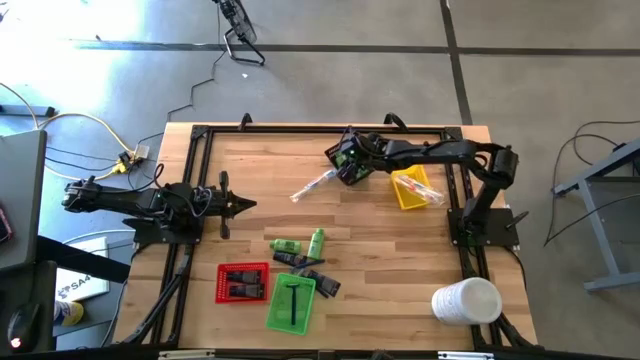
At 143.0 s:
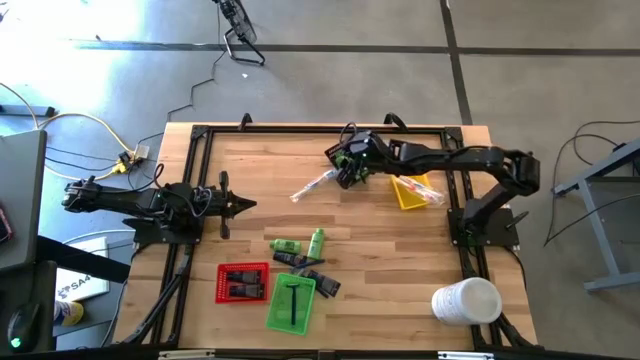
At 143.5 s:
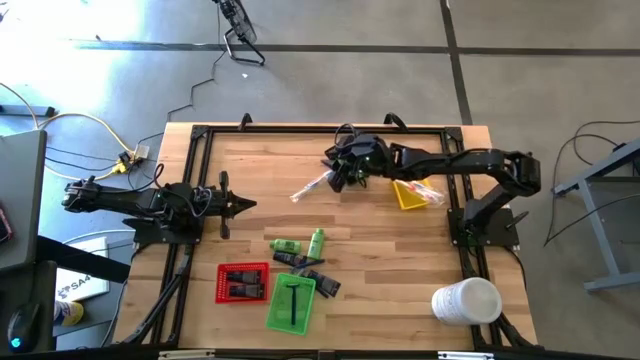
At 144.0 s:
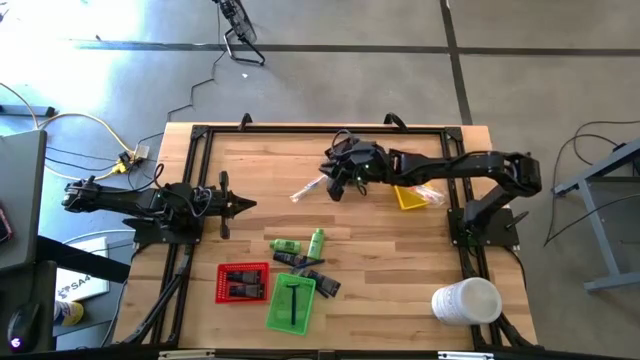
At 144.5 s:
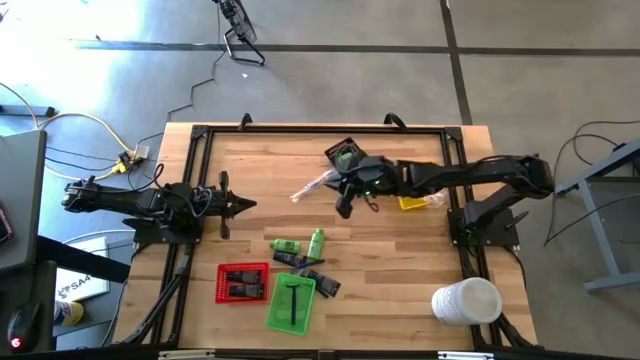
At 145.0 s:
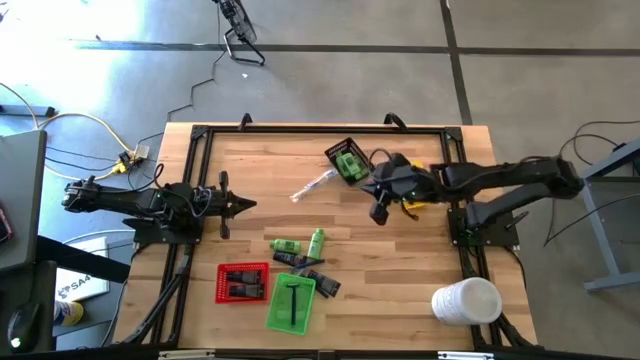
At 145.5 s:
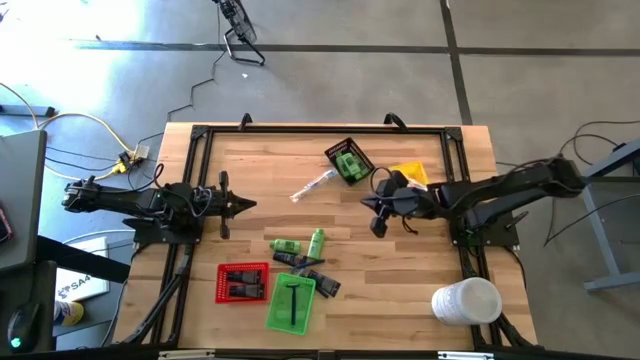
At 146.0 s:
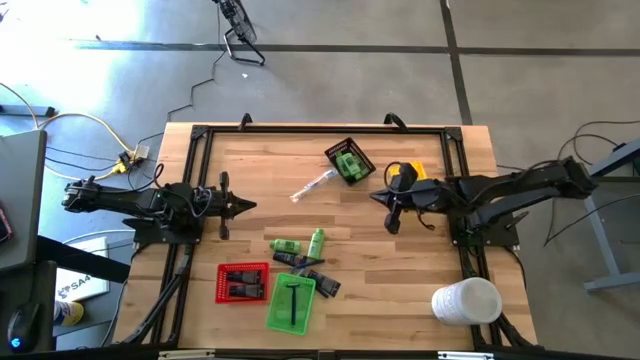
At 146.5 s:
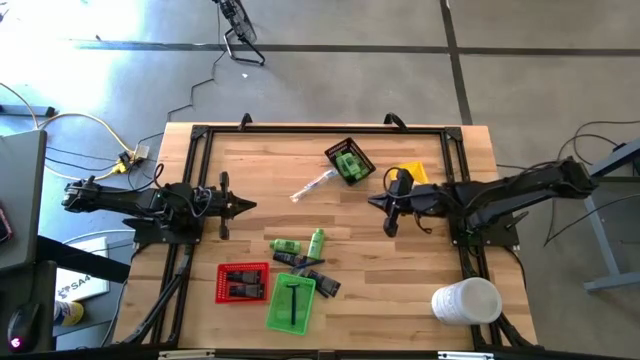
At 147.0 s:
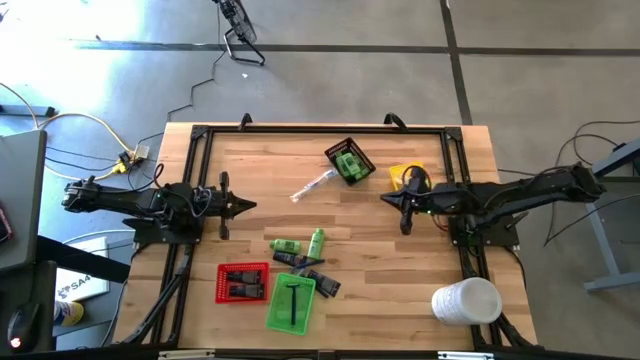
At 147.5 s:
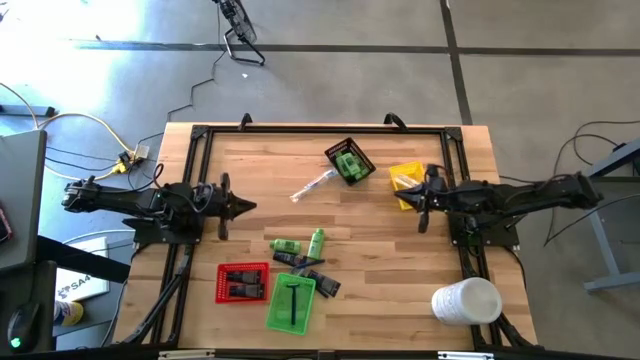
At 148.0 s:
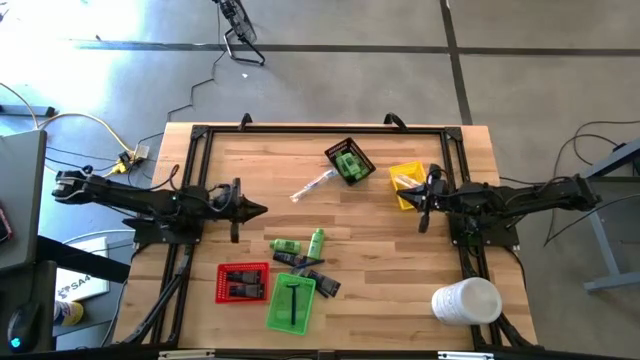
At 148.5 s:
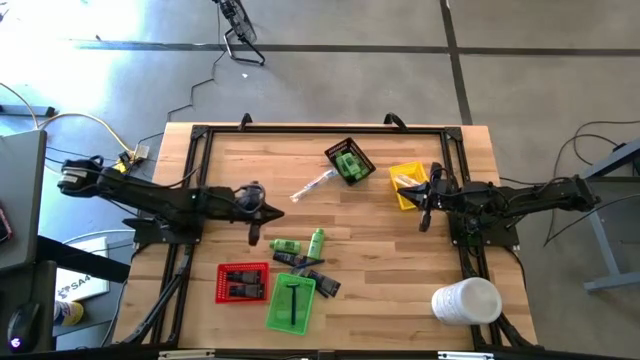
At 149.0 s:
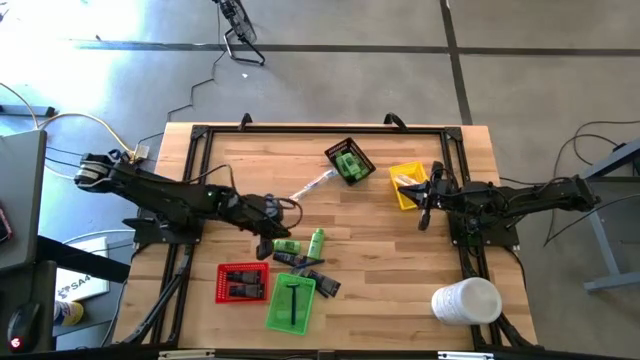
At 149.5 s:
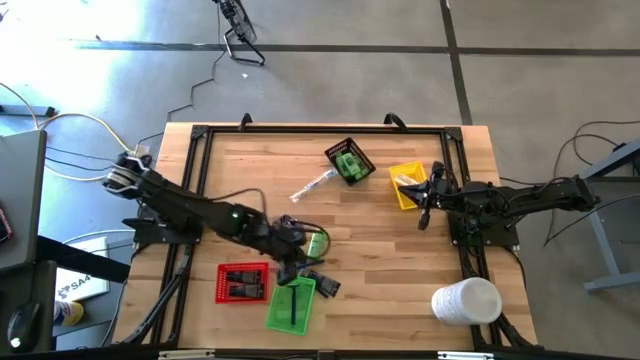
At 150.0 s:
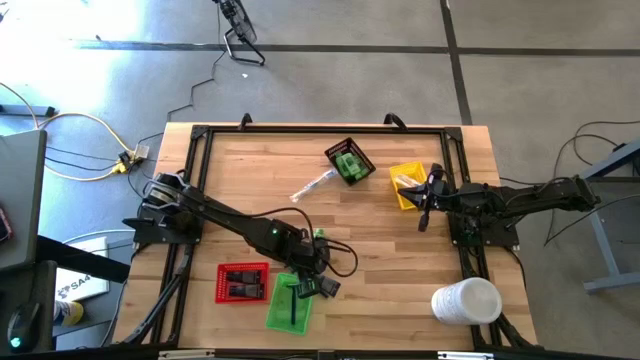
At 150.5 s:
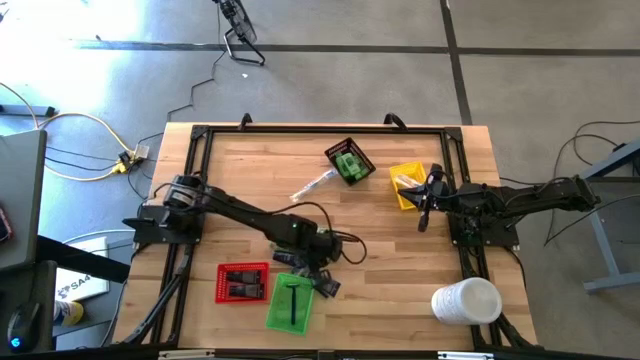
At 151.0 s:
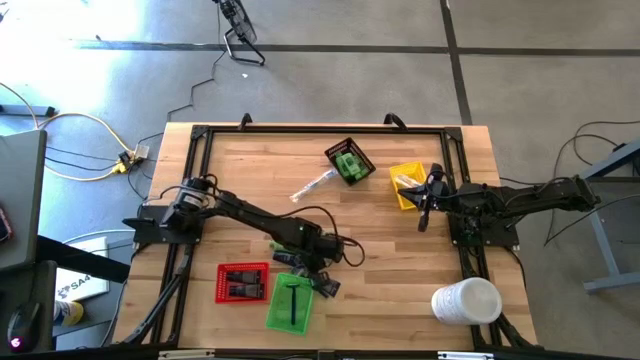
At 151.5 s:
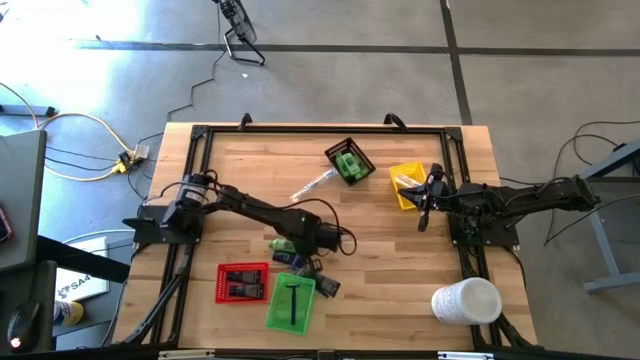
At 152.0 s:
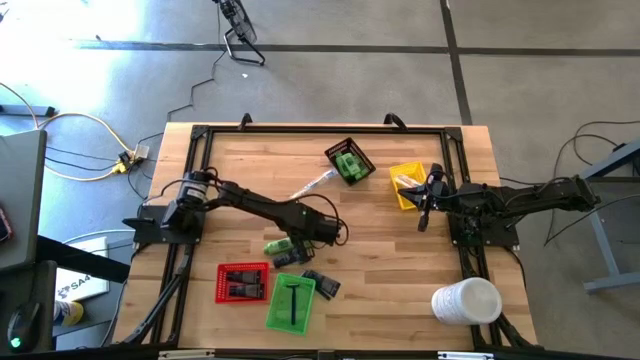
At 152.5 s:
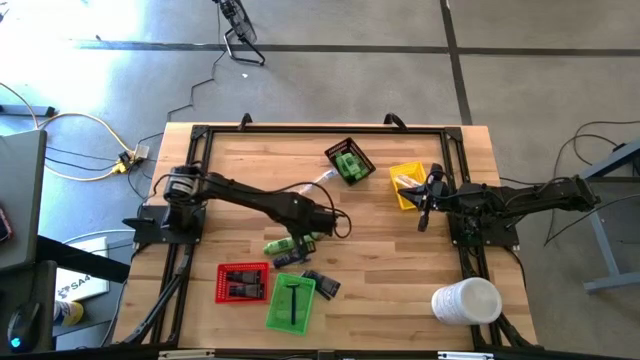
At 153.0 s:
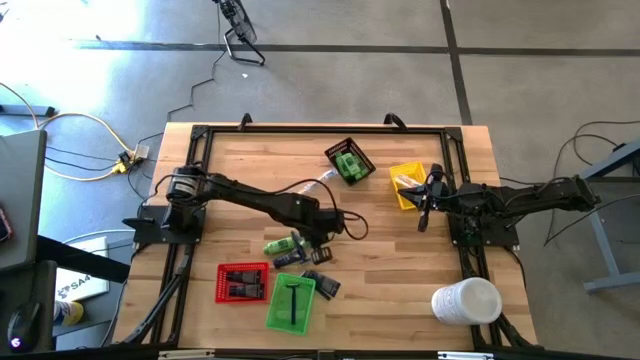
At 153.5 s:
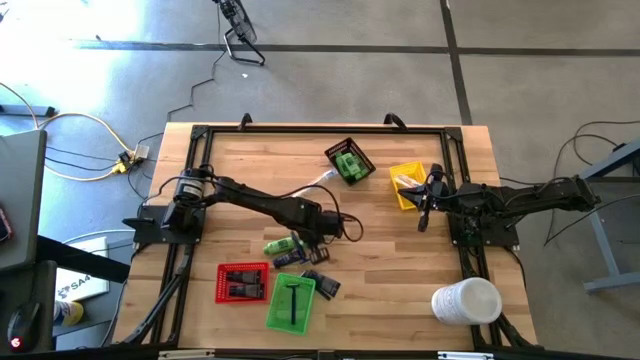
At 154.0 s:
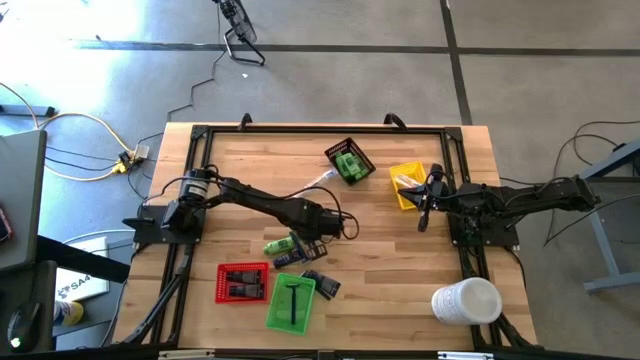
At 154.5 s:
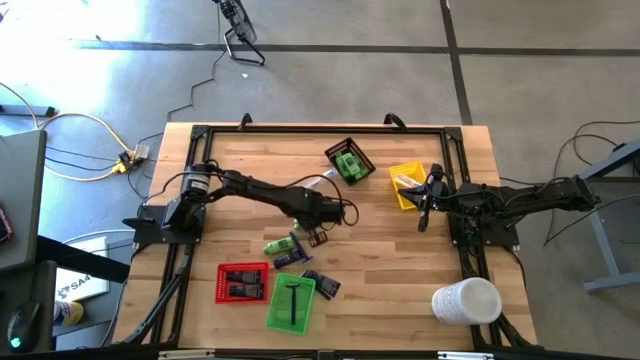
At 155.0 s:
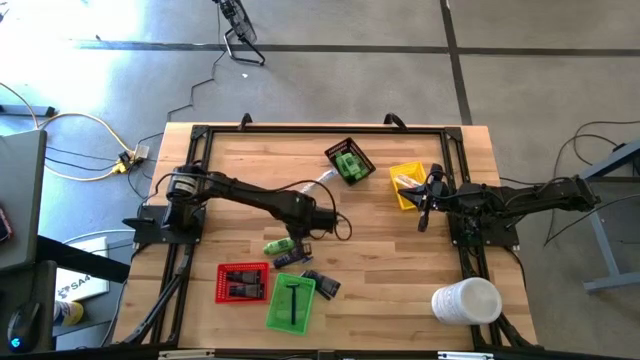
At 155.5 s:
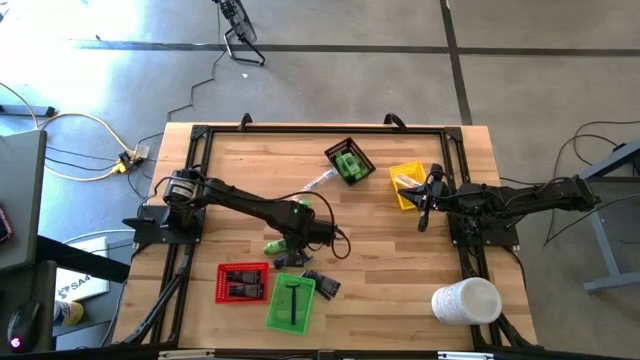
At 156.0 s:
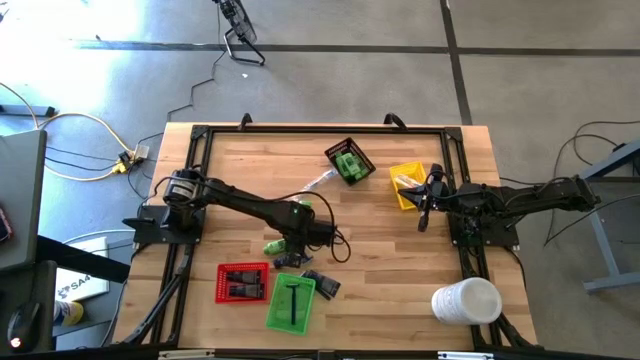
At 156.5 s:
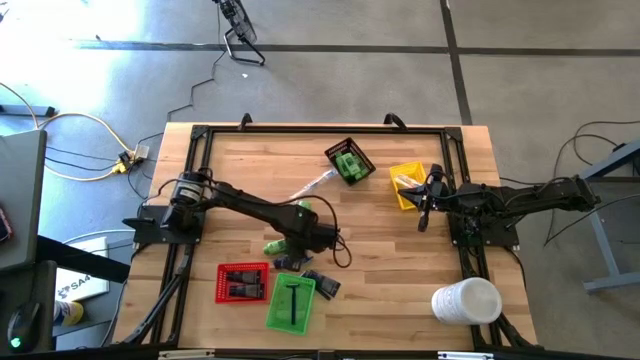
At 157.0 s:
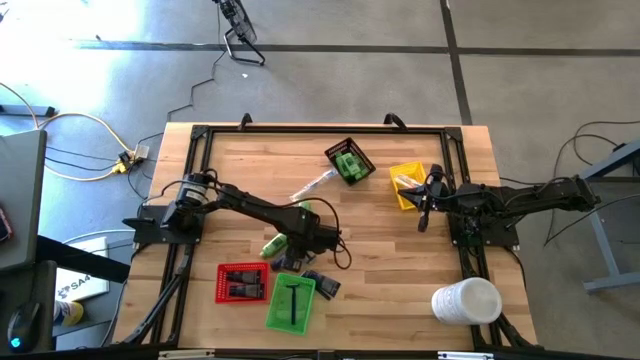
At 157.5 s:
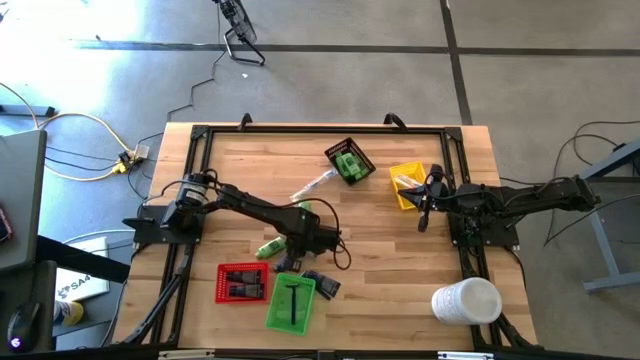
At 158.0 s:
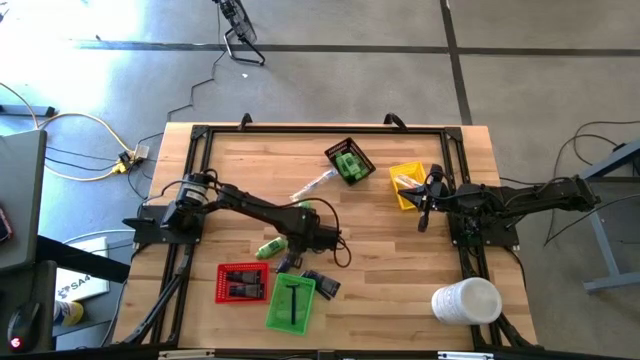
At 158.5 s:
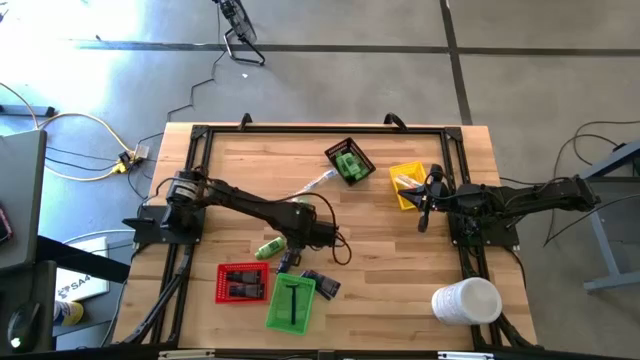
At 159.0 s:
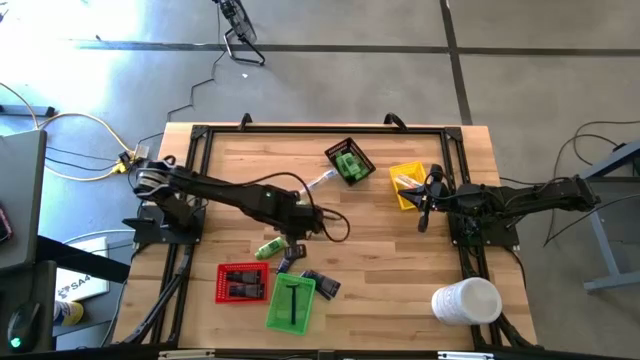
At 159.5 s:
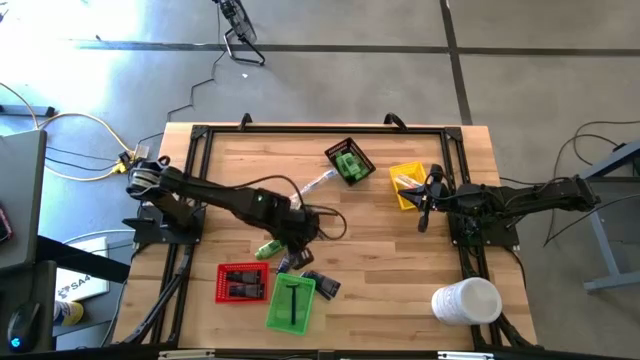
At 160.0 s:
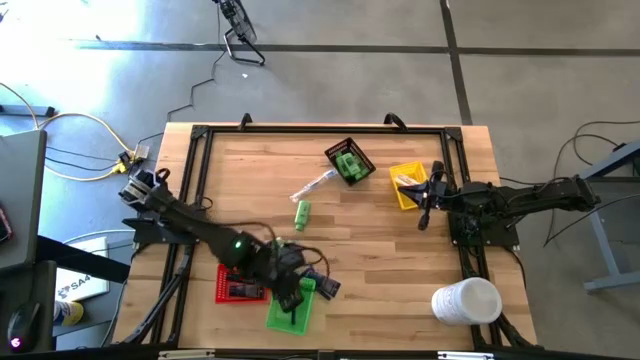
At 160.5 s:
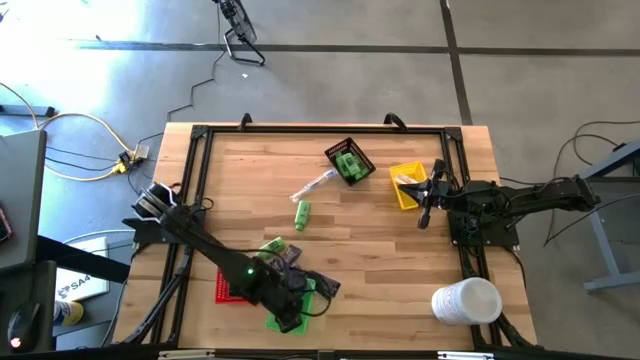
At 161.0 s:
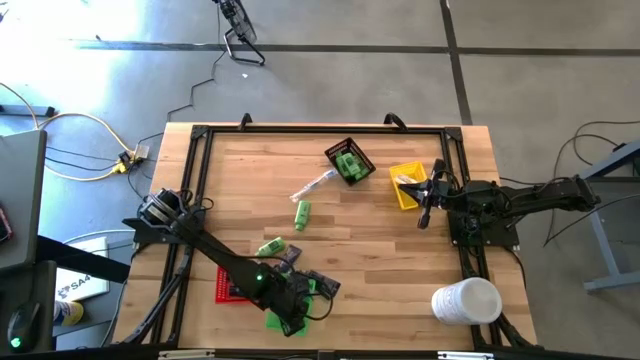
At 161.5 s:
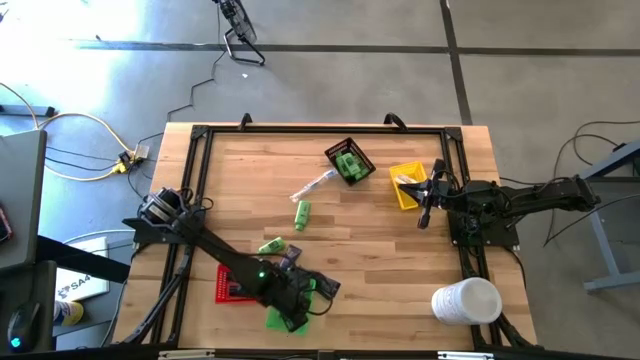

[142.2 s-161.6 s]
Task: Pick & Place Travel size toiletries
Put the top razor into the green bin

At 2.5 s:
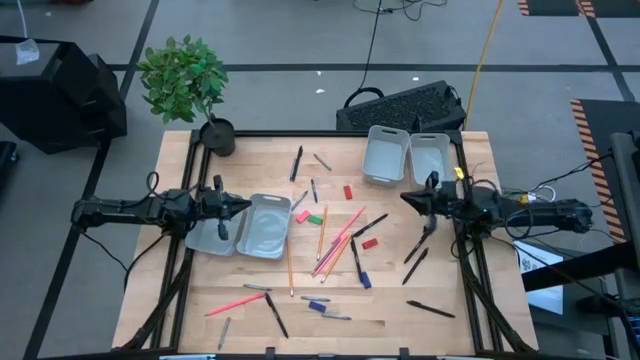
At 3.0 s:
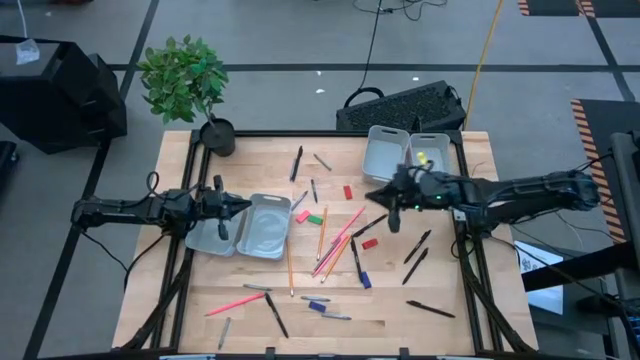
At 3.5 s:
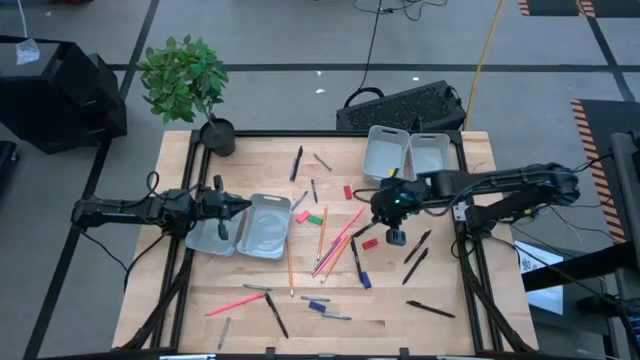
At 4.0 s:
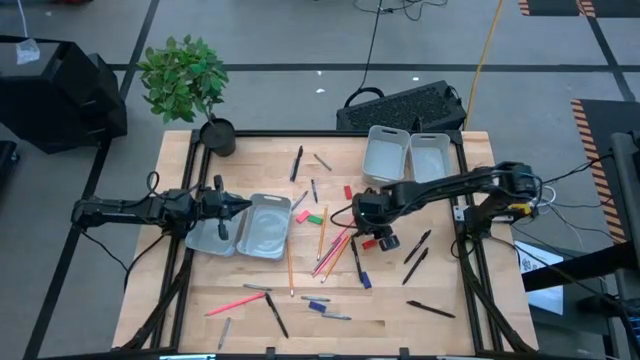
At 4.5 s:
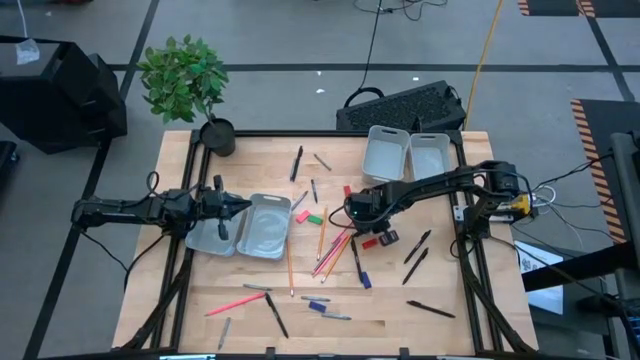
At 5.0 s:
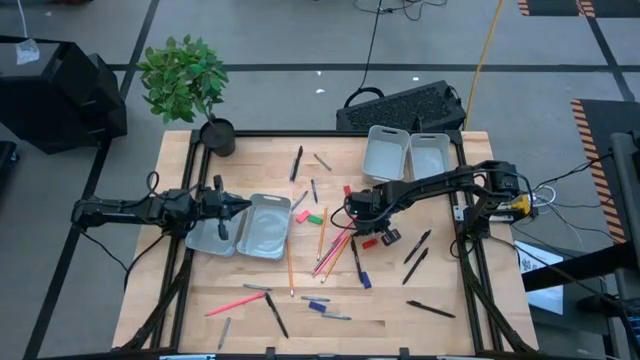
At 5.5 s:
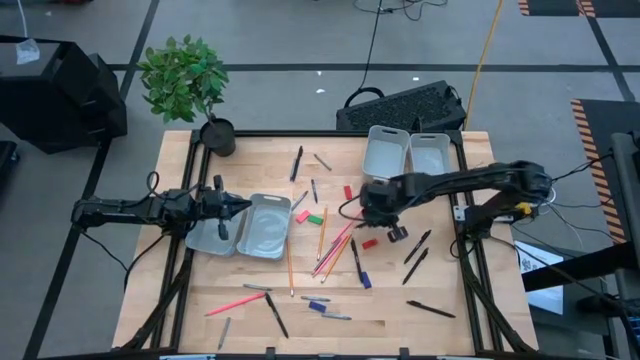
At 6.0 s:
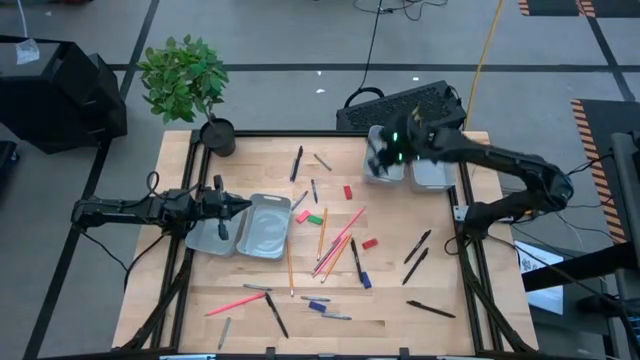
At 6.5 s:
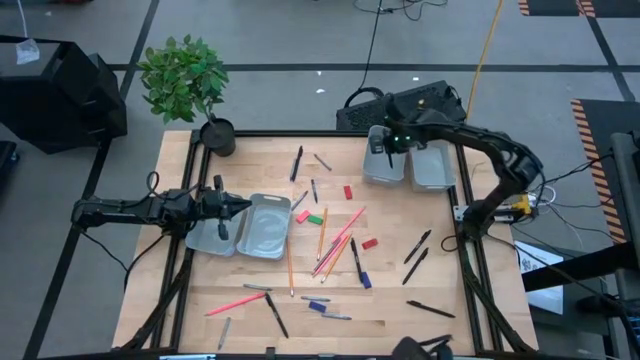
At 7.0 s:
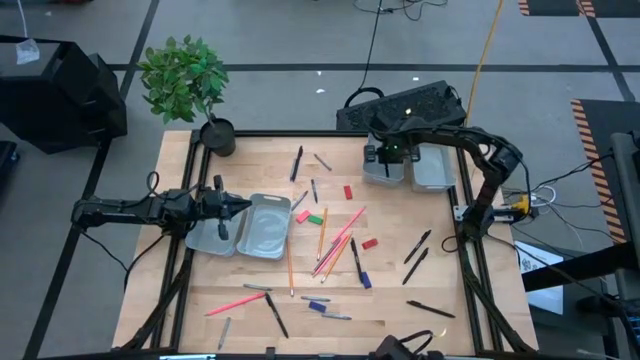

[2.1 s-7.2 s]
Task: Sort crayons/erasers/pens/pencils in bins
Put the black pen into the top left gray bin
